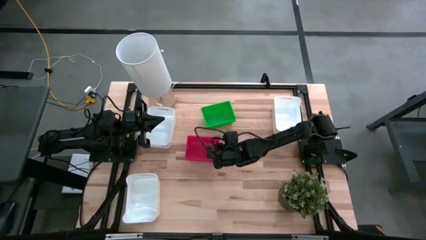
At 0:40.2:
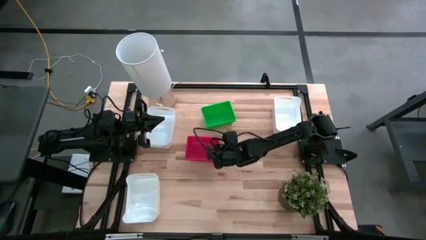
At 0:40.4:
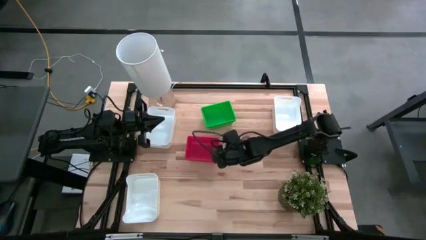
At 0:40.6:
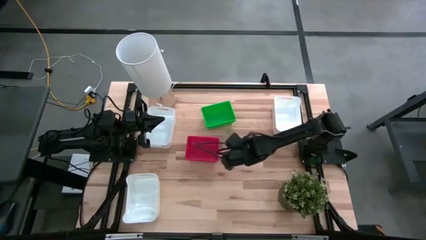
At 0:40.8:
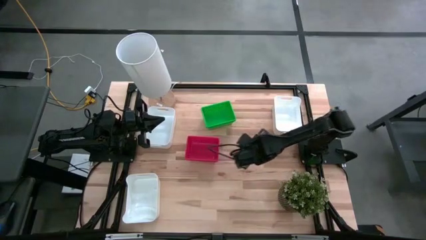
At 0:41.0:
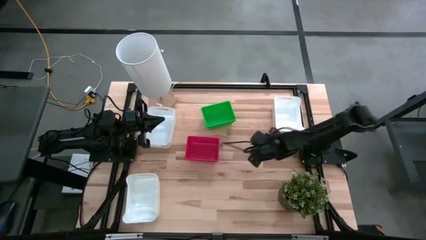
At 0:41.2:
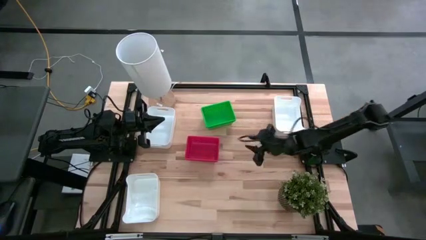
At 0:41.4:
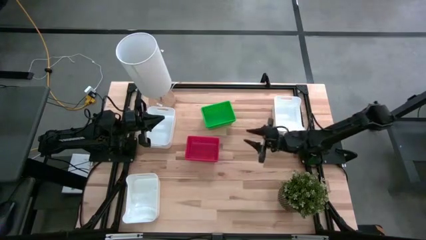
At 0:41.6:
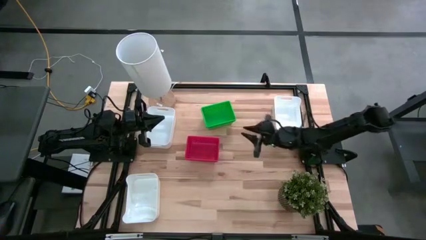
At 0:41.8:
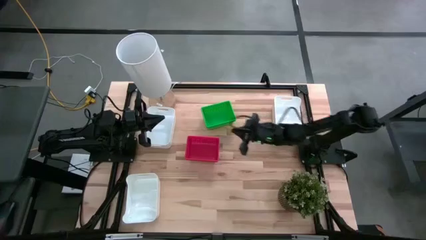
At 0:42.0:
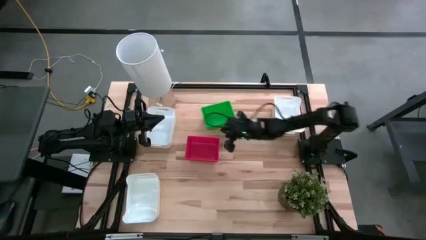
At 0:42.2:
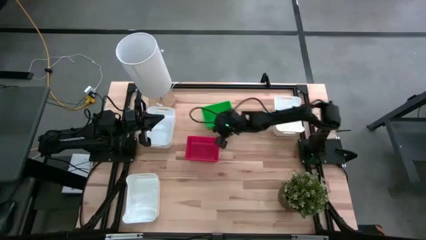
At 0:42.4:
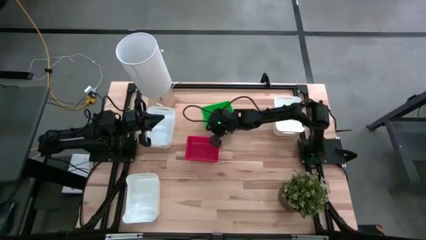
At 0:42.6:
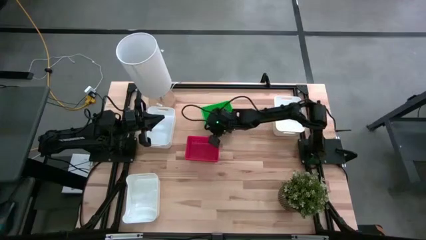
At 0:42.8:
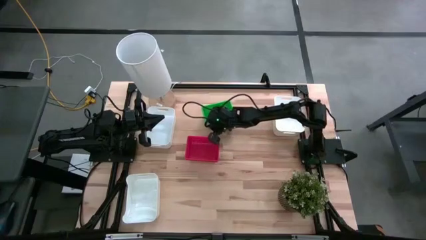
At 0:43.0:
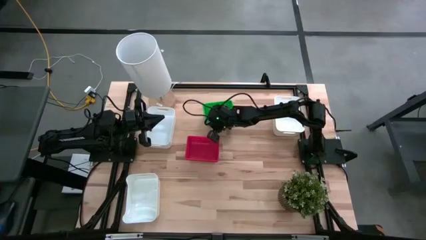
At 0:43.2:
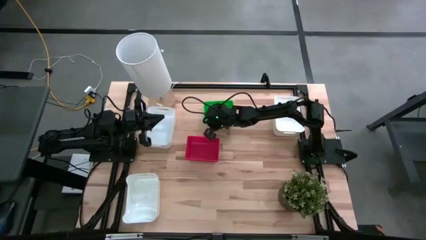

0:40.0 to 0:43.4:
Adjust the green bin

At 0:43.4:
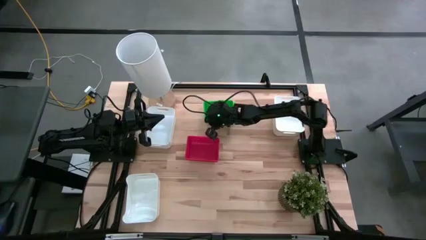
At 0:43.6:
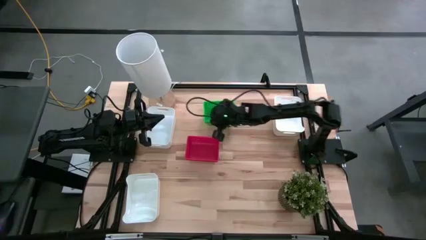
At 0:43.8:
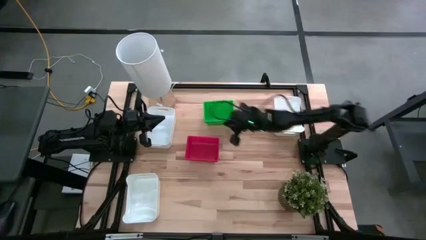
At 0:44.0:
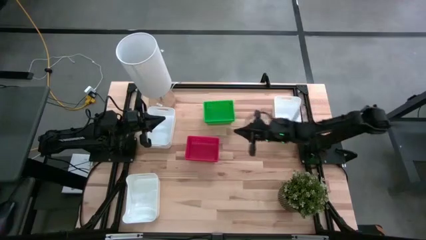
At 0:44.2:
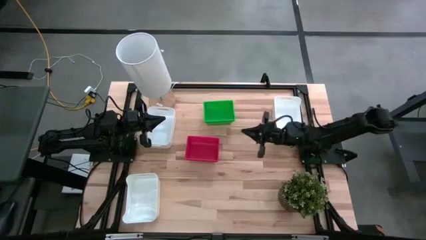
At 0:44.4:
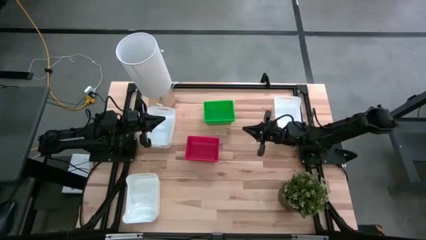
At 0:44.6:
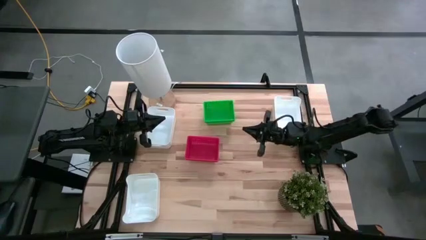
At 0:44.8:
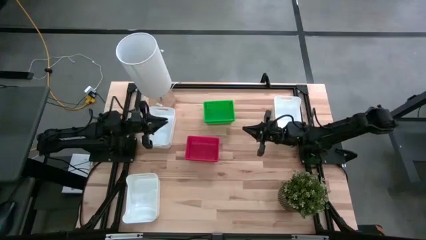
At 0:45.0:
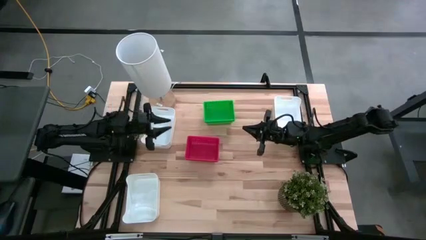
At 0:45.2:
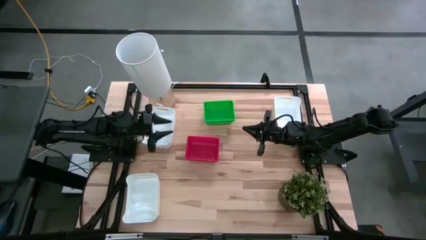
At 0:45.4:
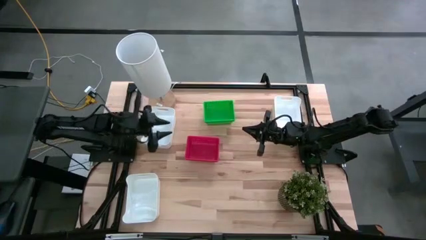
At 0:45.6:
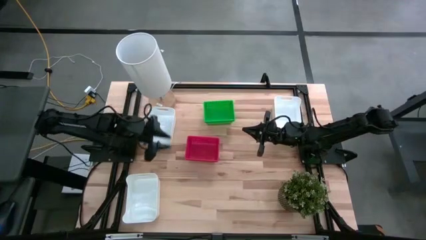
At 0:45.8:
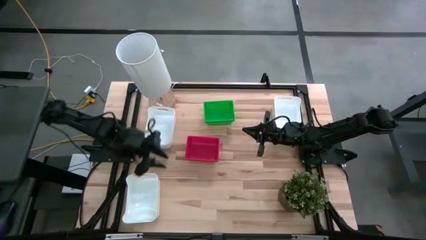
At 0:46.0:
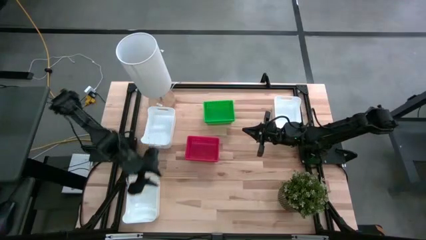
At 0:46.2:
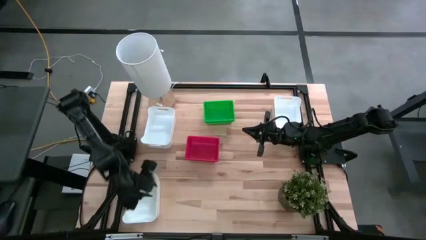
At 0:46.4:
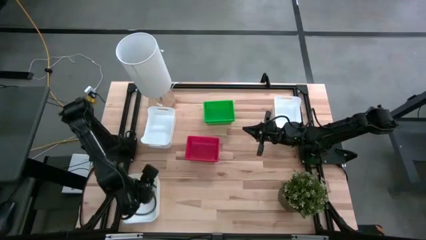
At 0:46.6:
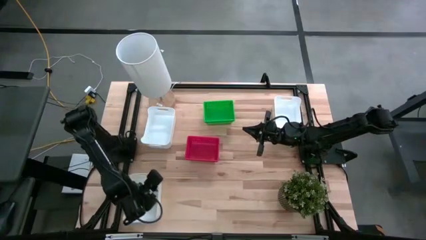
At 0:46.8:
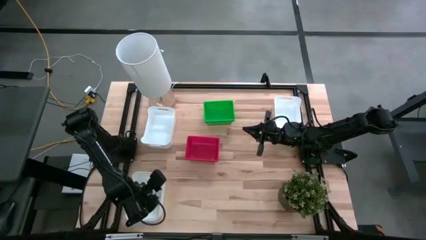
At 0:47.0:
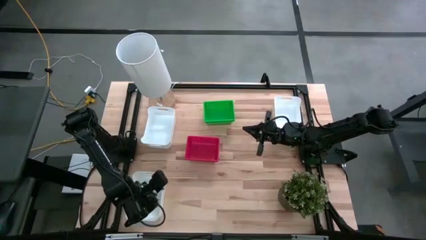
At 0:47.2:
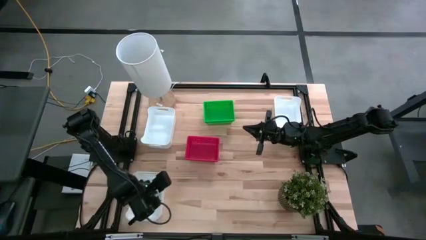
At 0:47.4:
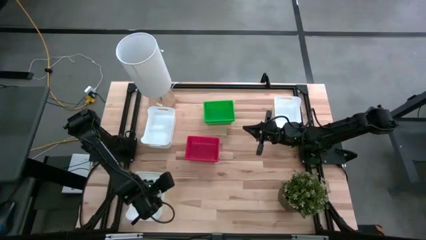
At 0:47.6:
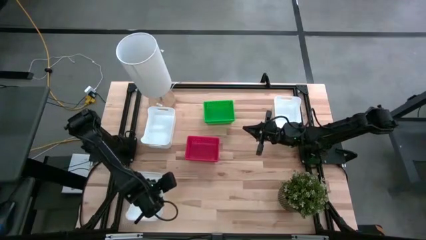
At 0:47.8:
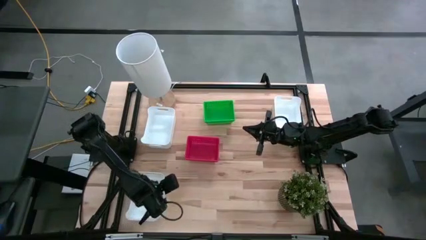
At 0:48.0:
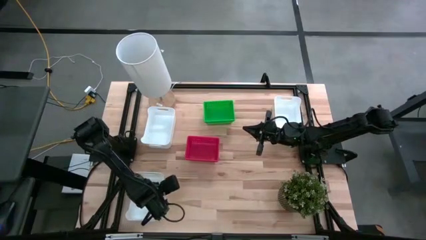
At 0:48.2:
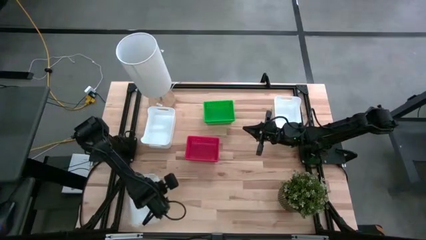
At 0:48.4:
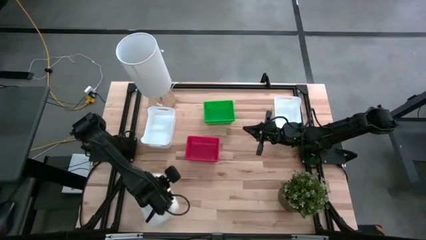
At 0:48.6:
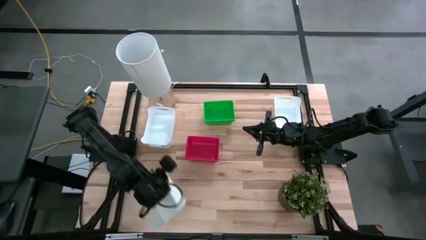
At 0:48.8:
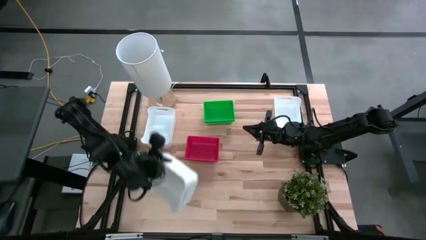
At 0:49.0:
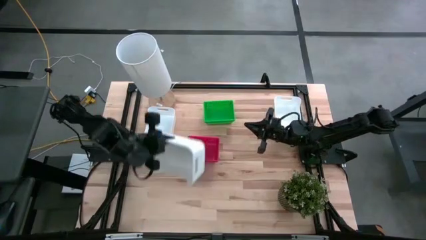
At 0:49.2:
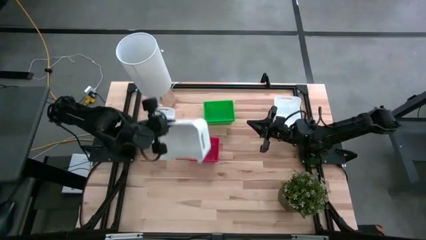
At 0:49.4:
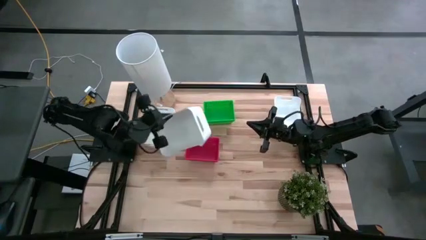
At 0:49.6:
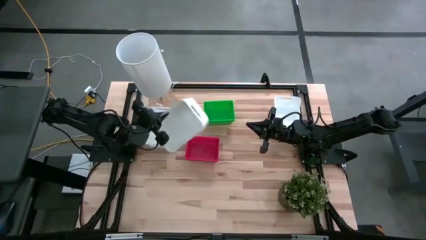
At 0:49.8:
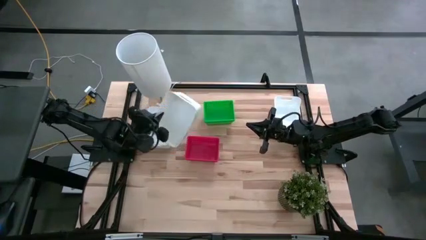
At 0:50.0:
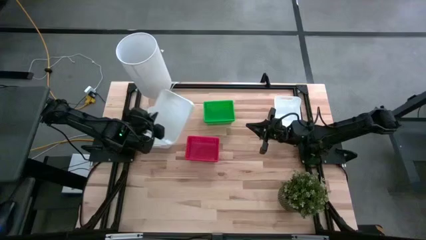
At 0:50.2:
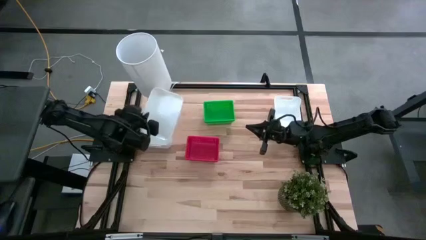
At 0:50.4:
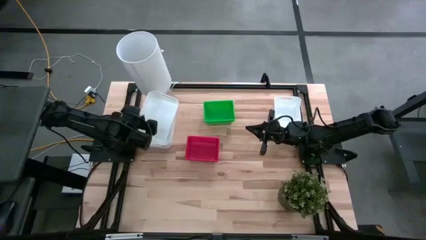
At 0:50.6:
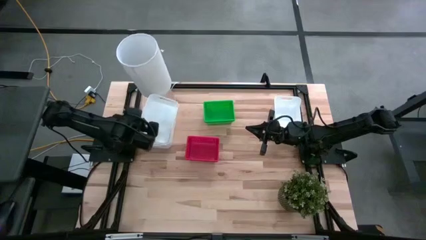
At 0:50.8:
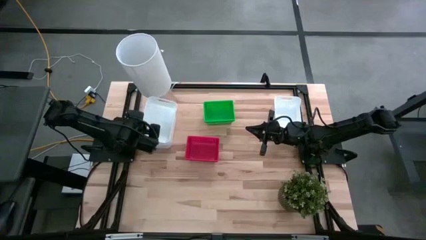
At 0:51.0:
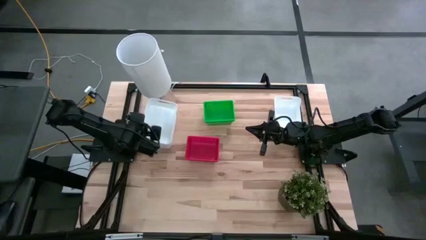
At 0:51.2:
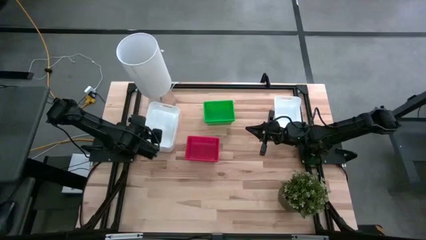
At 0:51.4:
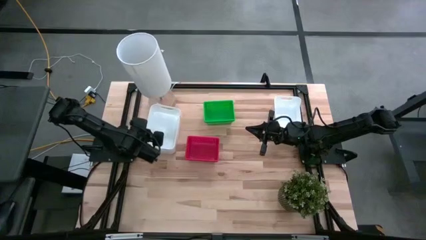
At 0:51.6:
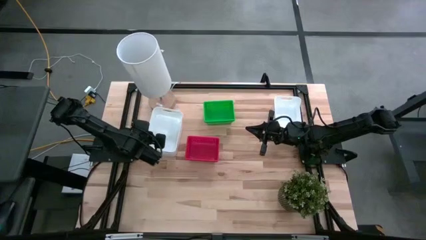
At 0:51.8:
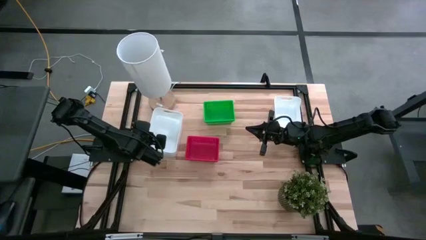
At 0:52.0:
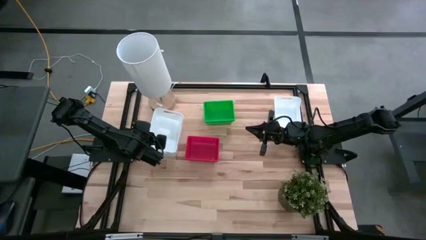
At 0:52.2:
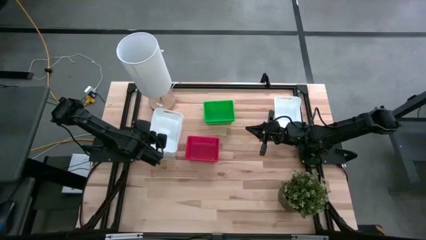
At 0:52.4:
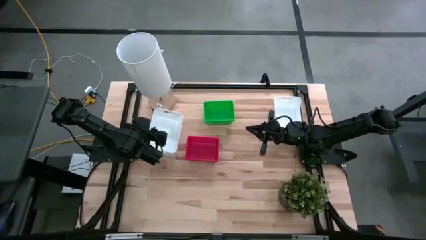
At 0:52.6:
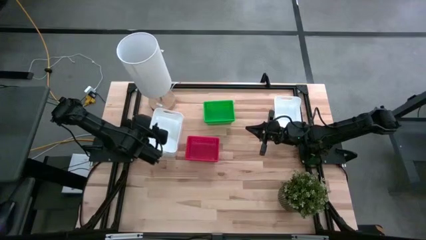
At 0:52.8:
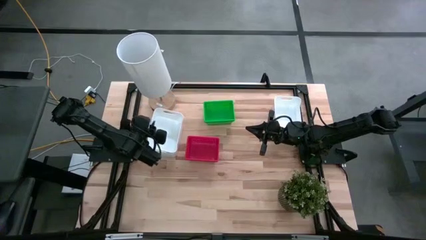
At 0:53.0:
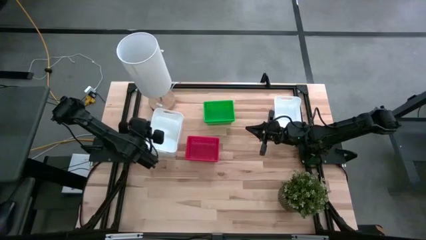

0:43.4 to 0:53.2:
Stack the bottom left white bin on the left white bin
